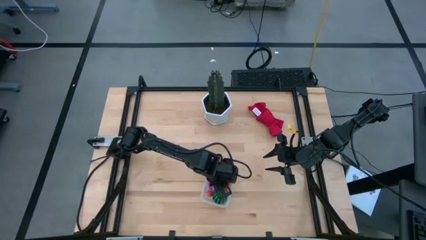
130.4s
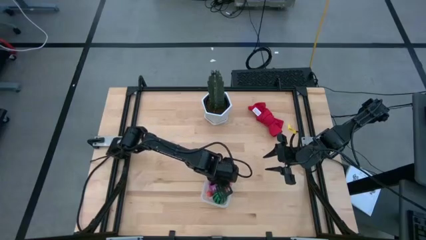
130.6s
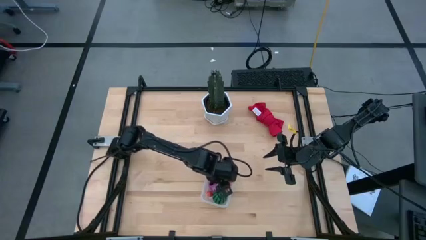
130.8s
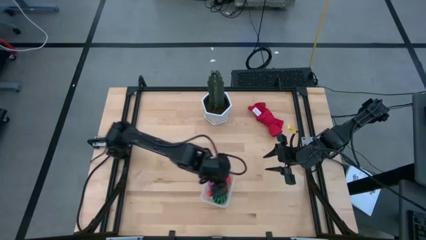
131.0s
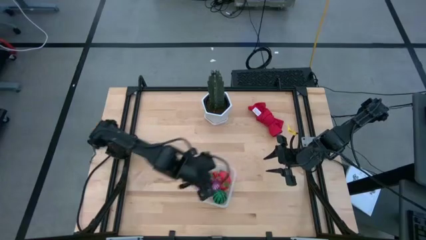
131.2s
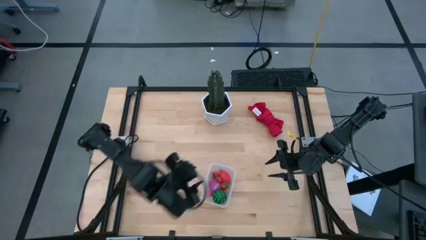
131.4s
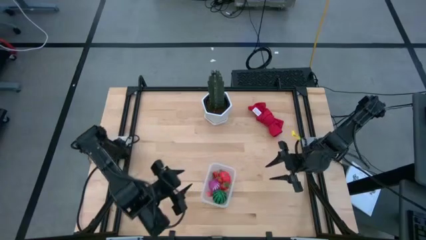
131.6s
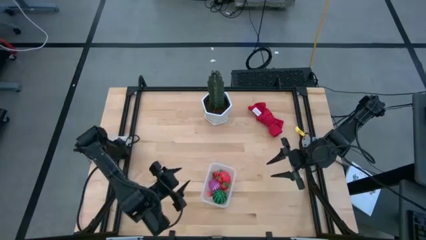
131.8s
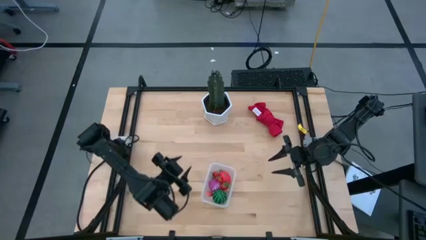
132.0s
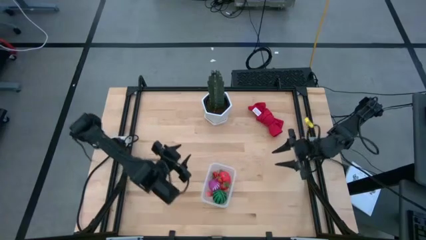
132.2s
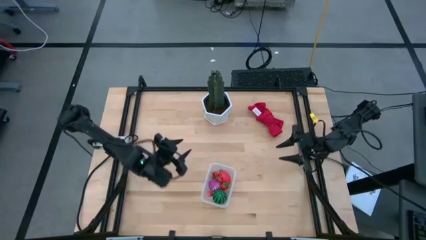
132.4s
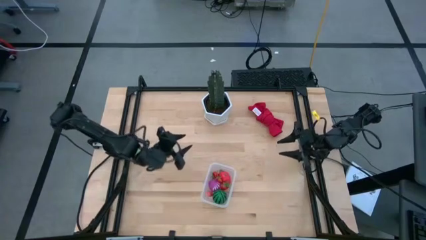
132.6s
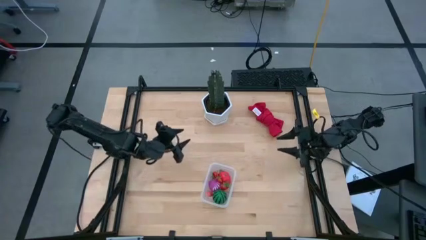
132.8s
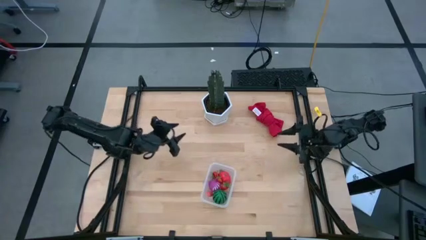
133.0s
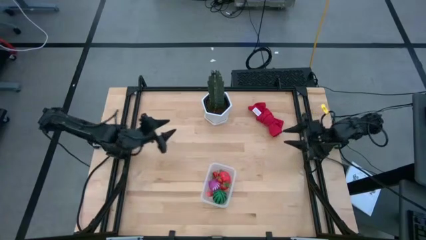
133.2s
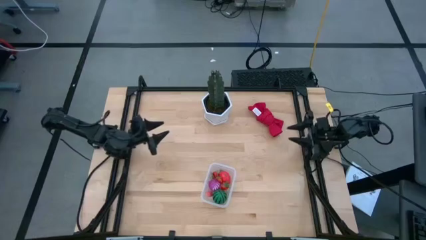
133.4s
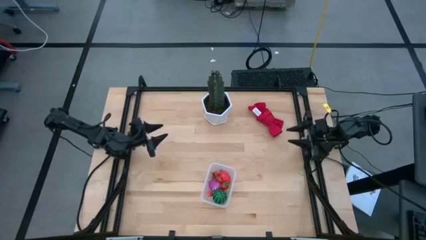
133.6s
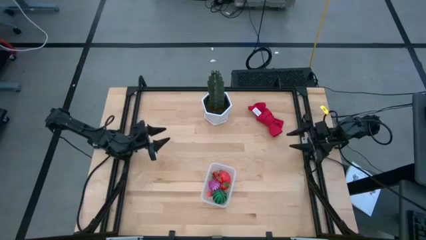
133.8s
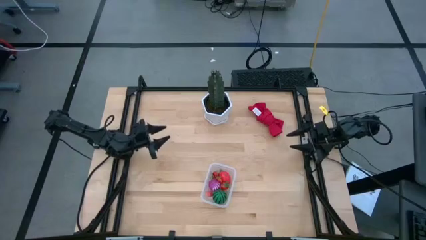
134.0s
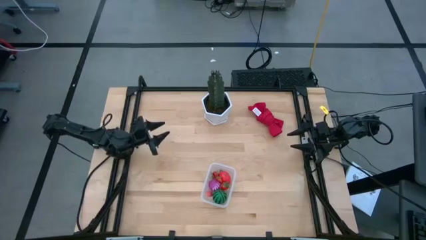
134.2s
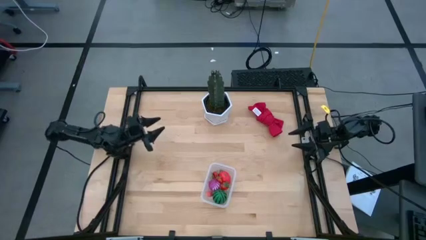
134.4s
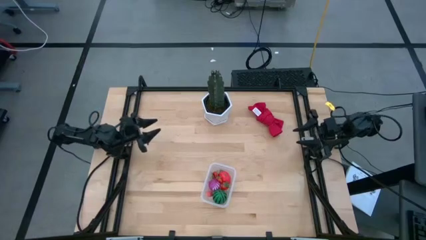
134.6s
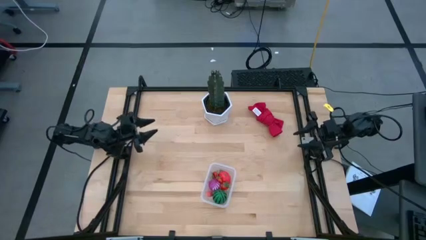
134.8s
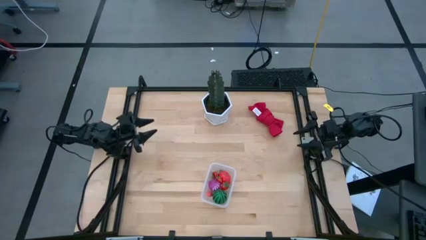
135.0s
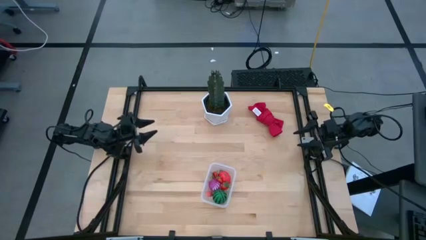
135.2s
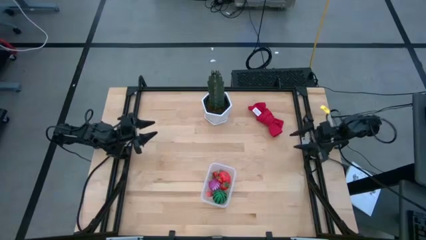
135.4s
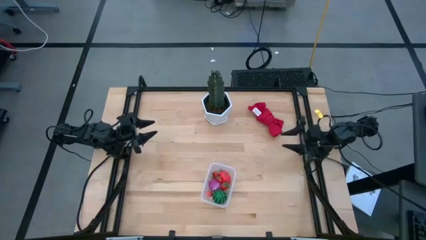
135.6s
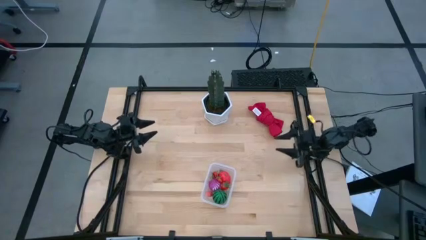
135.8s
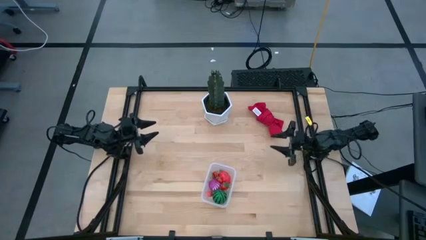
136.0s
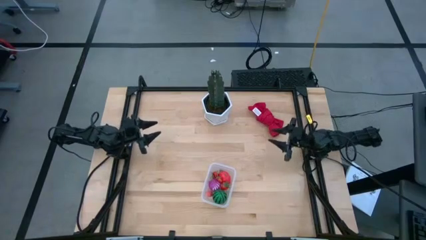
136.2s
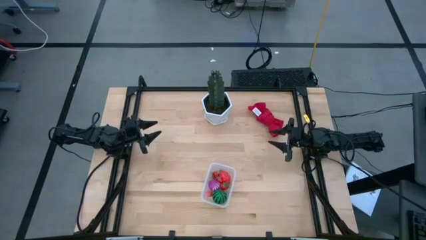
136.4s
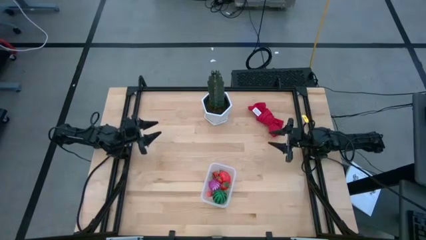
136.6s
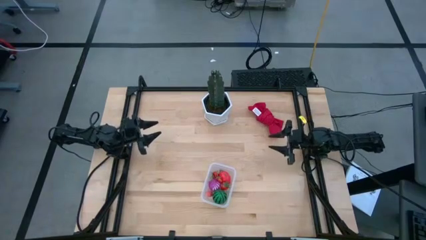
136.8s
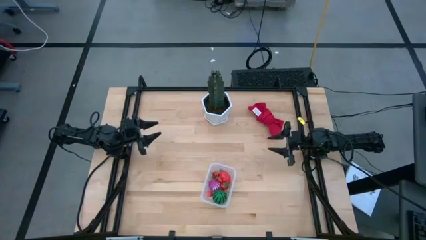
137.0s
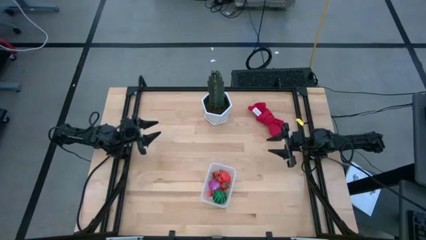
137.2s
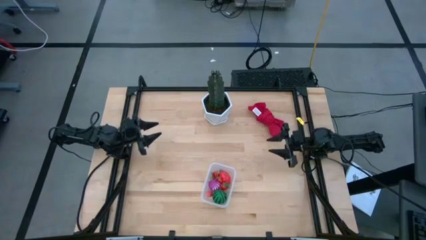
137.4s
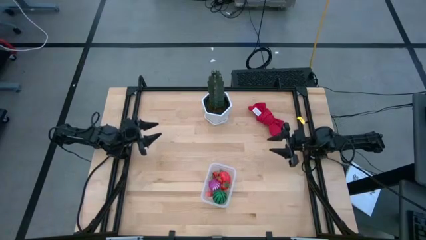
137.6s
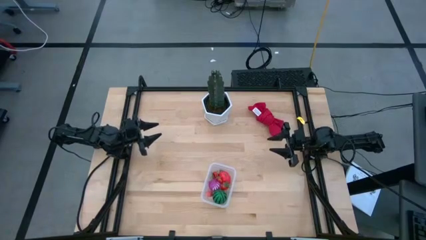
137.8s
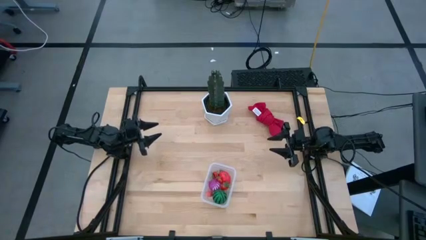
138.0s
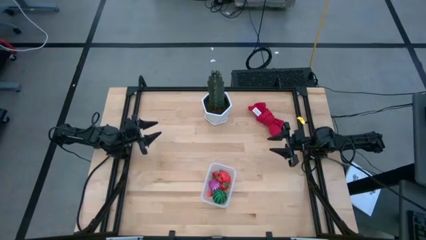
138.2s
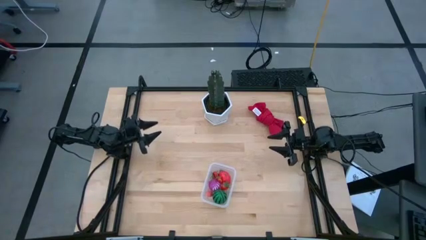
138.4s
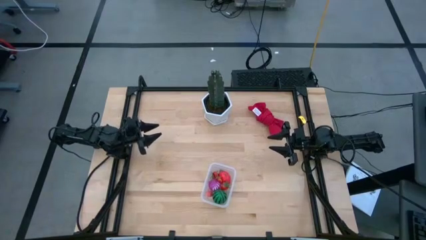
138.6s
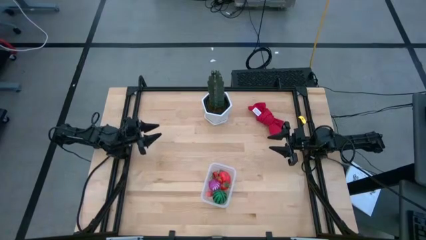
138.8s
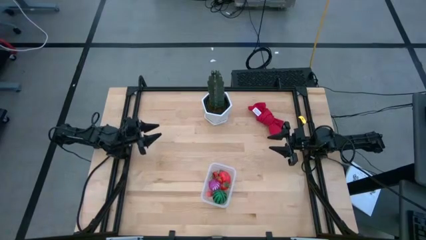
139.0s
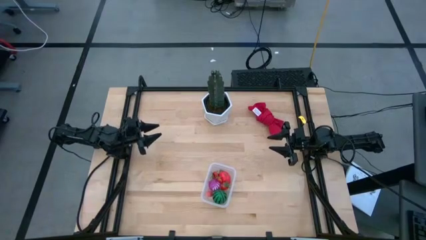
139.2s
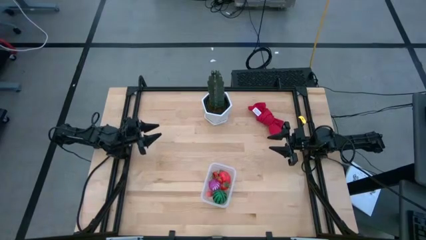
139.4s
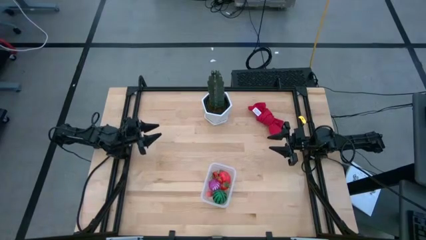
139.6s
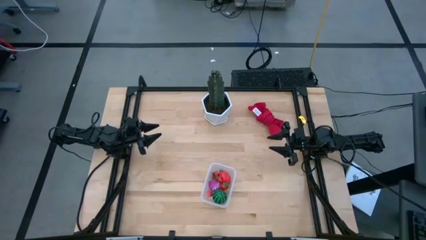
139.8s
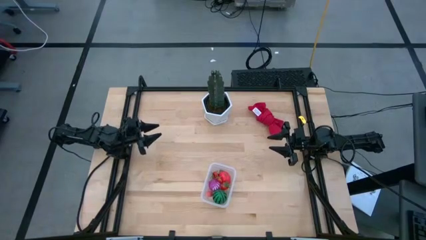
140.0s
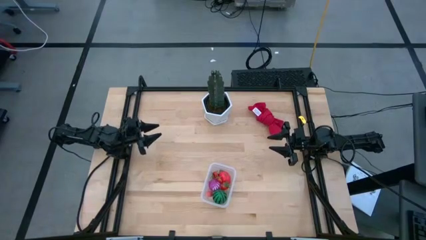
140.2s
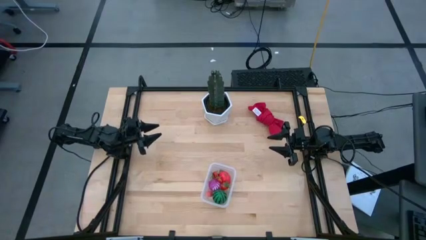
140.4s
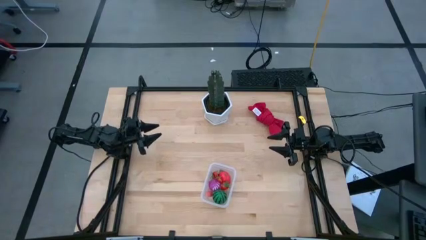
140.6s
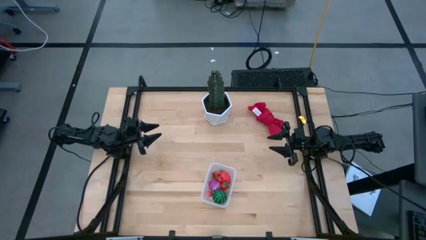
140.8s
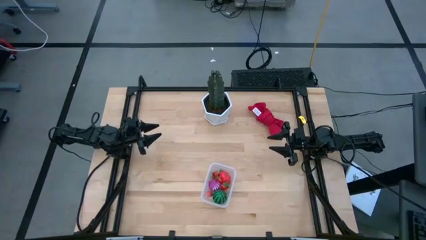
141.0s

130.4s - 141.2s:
Task: Pick and placing Produce into tupperware
Return to Home Position

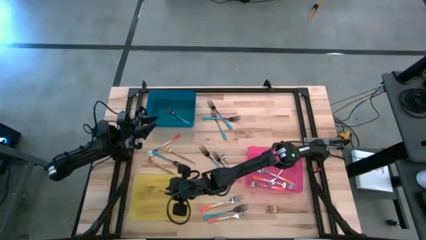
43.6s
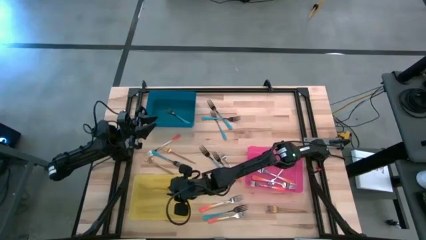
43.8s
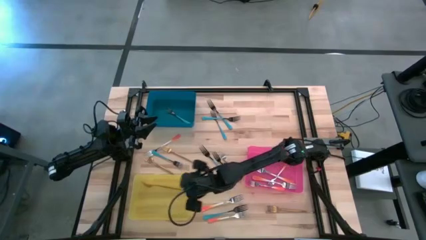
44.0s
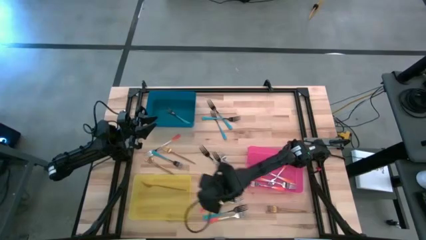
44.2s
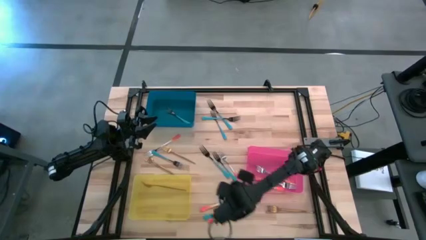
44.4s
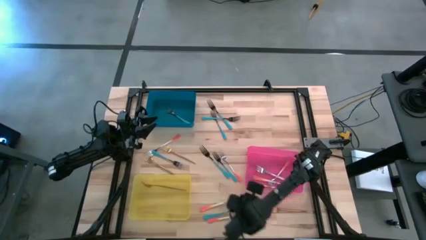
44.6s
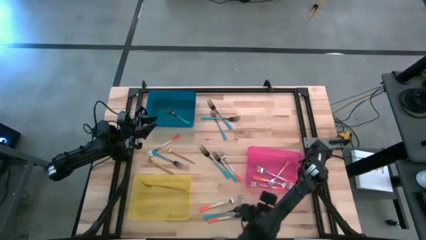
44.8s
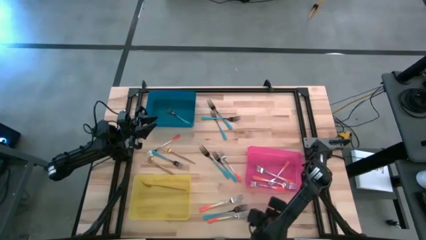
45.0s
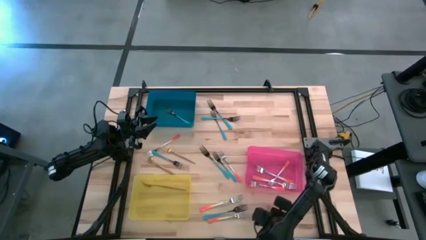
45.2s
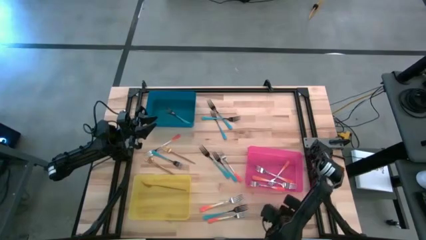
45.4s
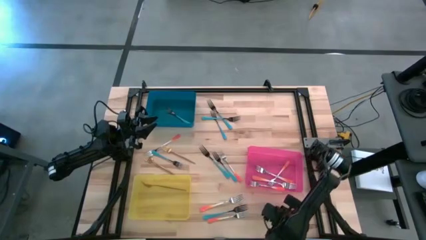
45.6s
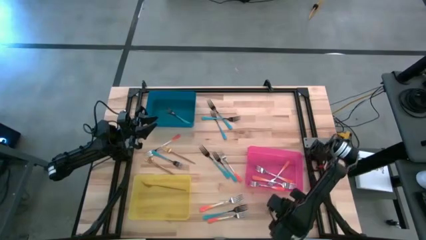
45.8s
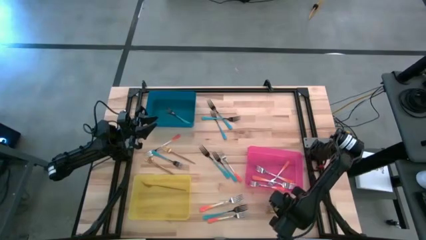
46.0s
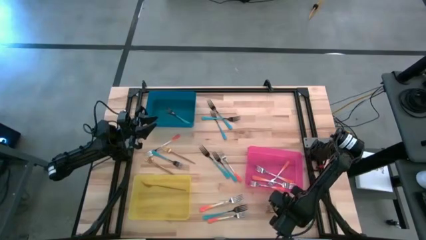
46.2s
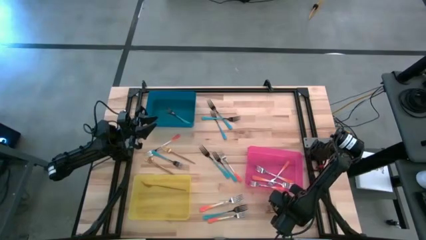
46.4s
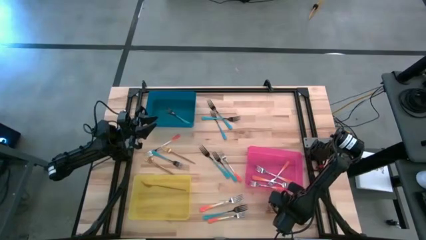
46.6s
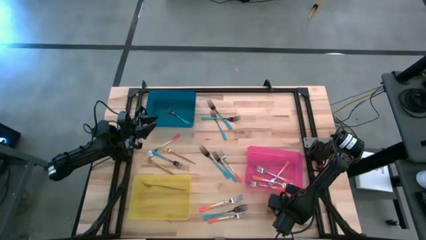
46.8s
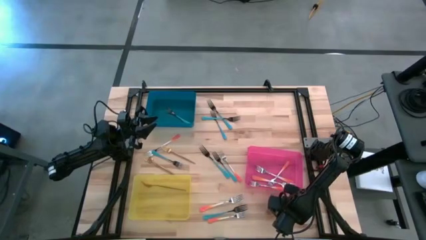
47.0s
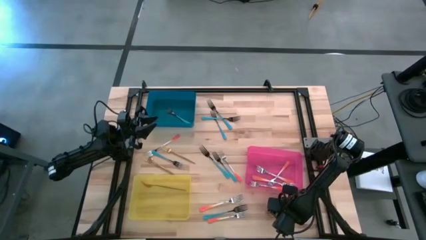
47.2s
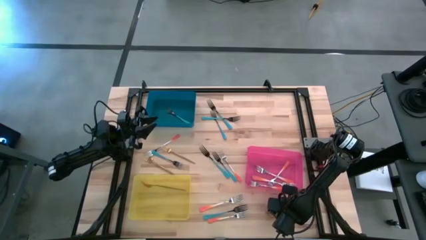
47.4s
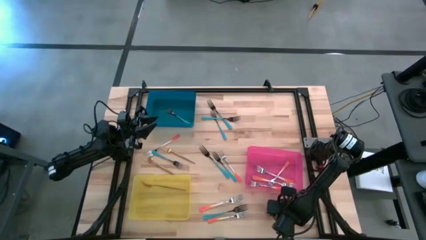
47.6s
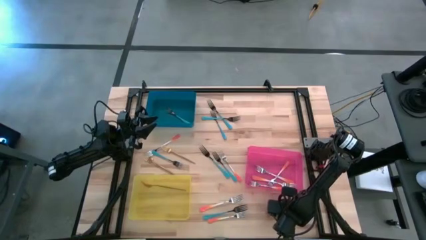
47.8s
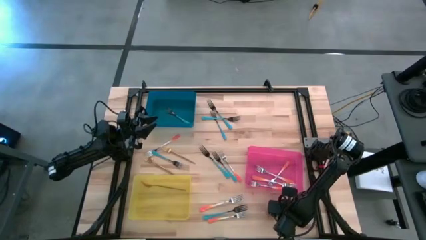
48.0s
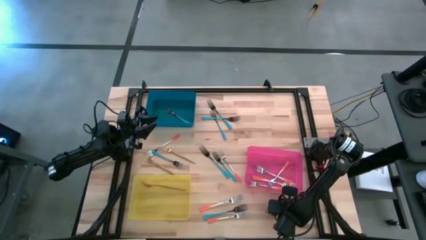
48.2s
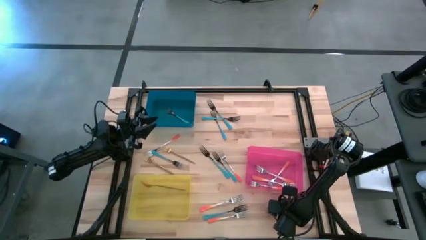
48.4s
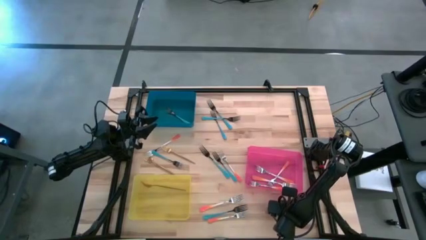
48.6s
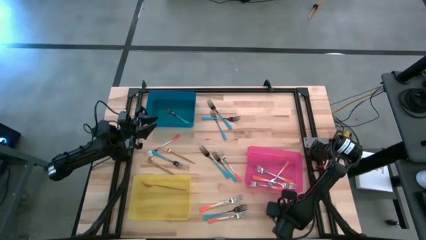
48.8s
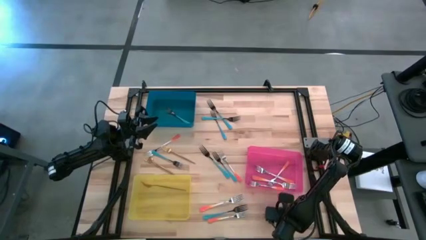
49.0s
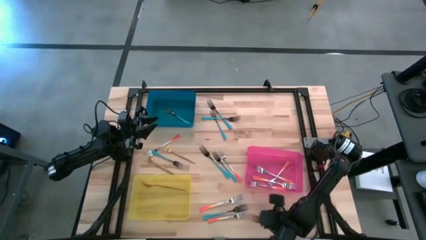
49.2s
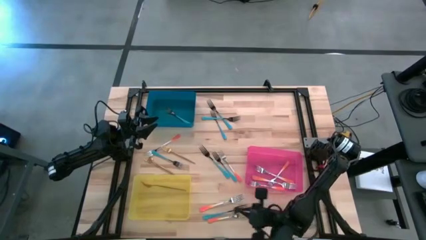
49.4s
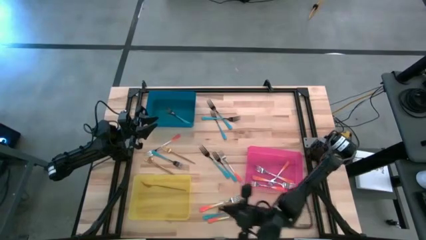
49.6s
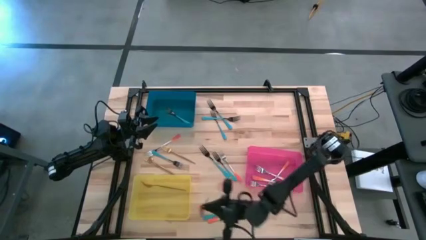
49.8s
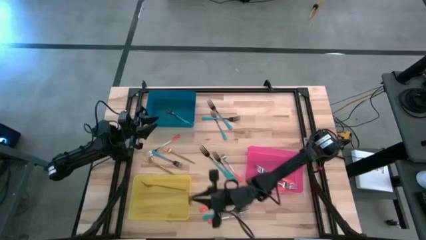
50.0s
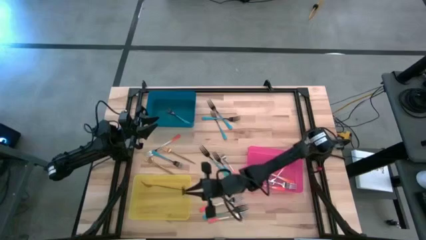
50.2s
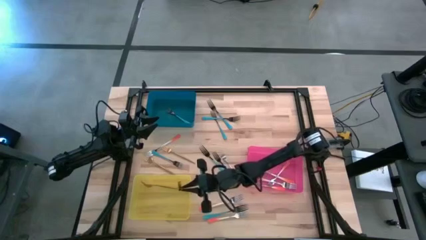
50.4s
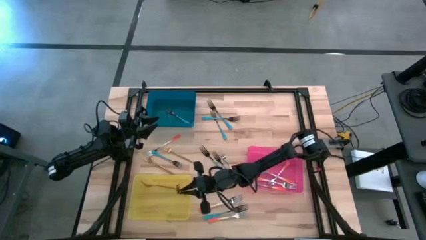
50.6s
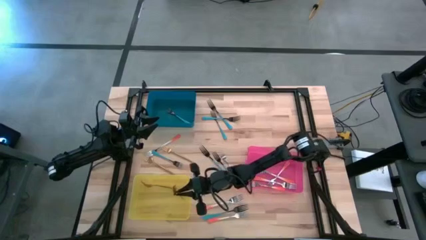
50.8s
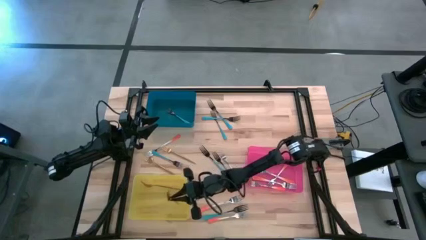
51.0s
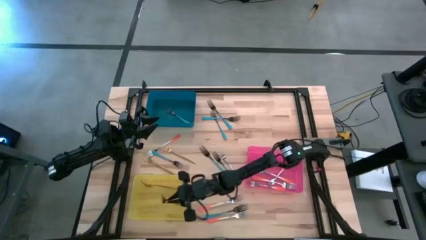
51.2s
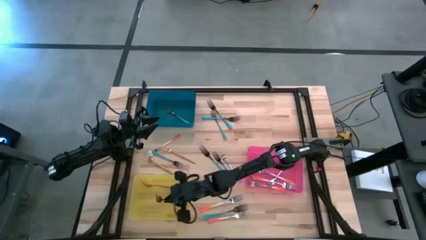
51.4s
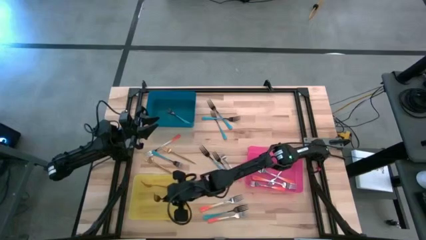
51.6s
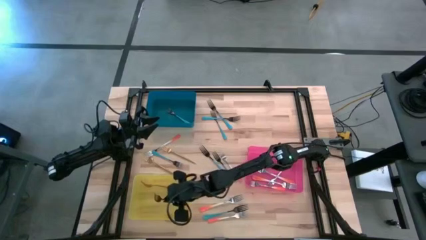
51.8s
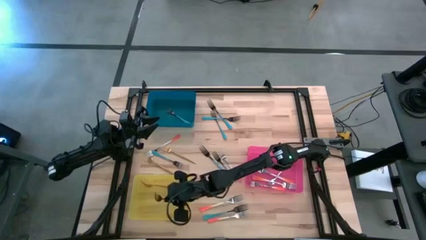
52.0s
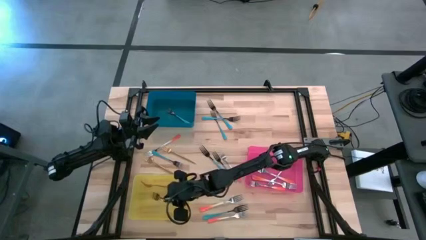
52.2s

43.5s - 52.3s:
Task: Sort silverware by color (type)
Put the gold fork into the yellow bin
